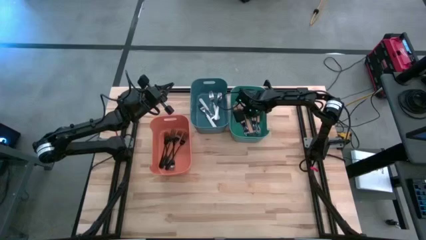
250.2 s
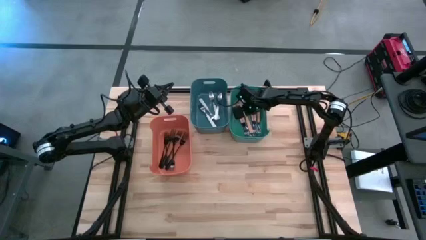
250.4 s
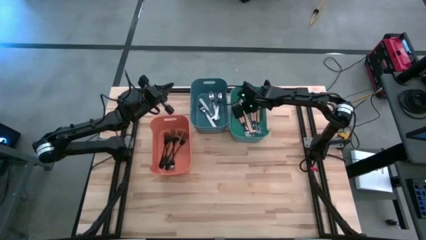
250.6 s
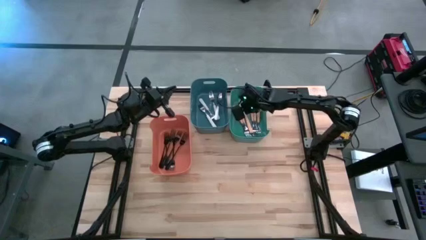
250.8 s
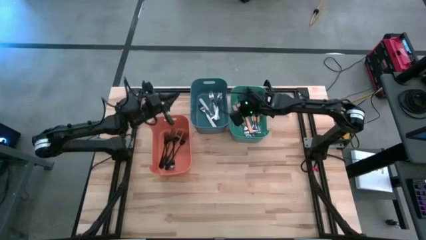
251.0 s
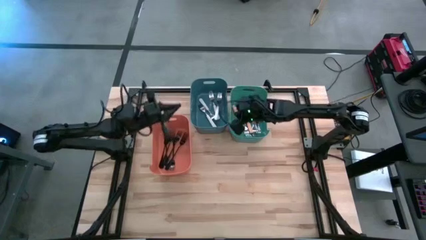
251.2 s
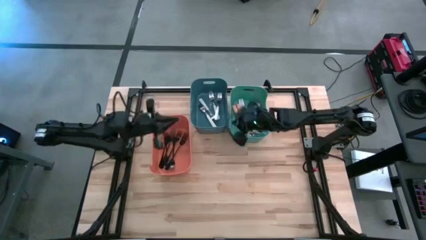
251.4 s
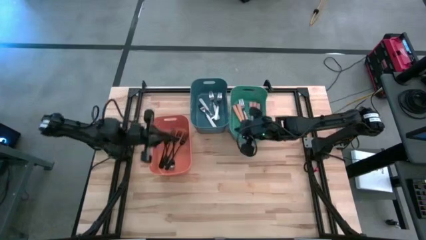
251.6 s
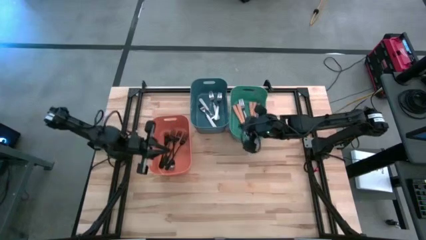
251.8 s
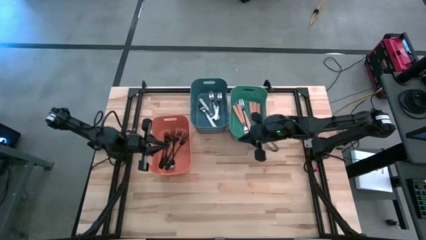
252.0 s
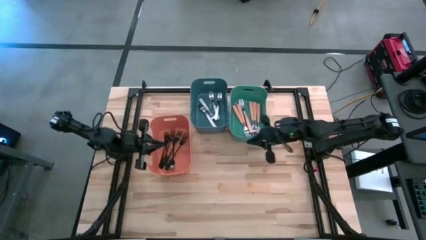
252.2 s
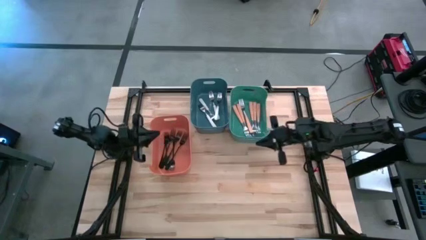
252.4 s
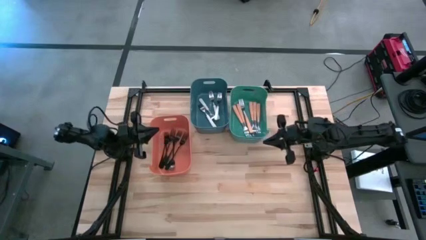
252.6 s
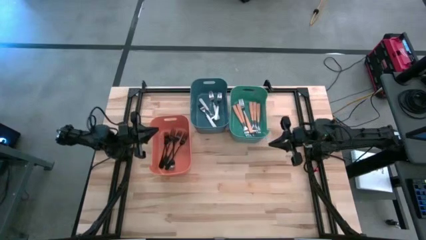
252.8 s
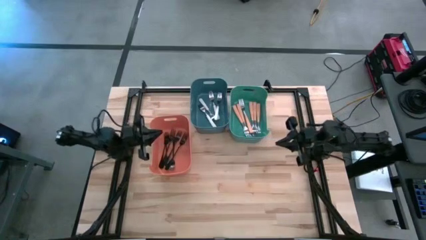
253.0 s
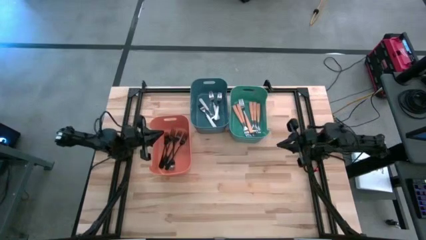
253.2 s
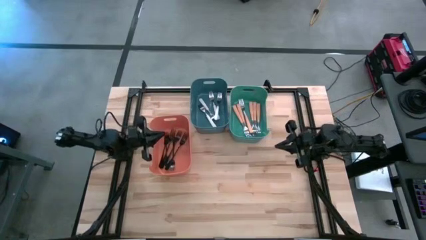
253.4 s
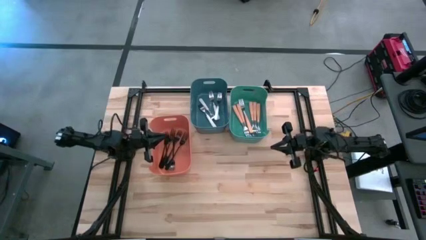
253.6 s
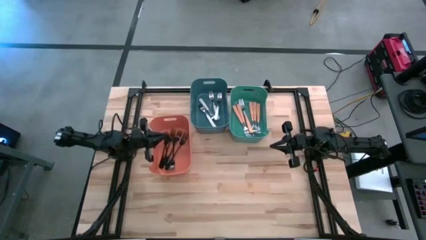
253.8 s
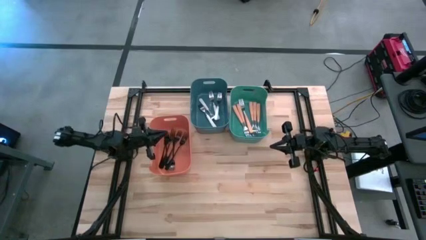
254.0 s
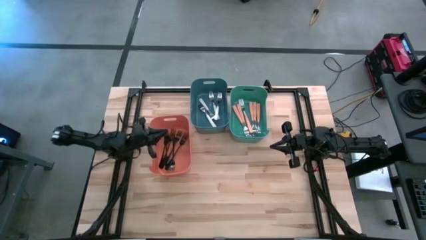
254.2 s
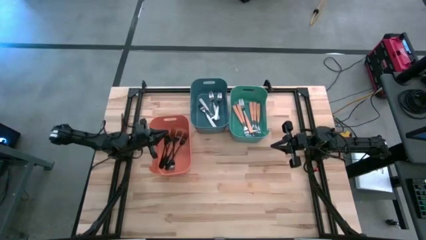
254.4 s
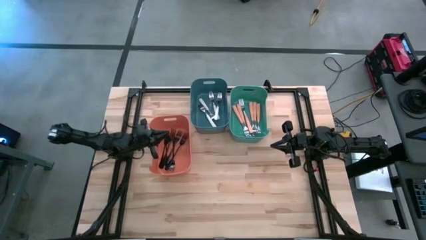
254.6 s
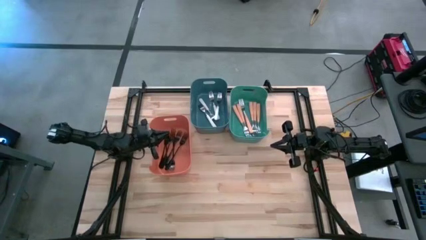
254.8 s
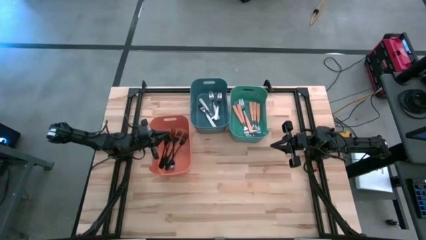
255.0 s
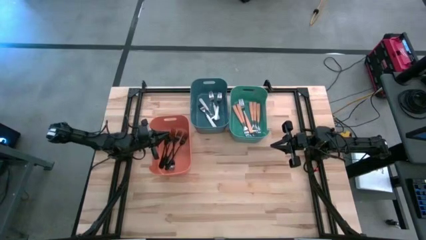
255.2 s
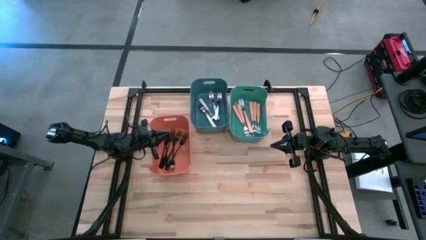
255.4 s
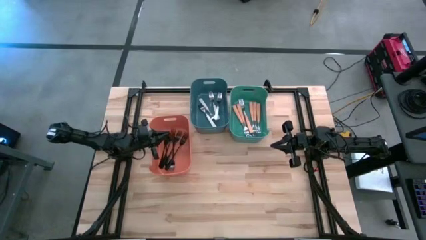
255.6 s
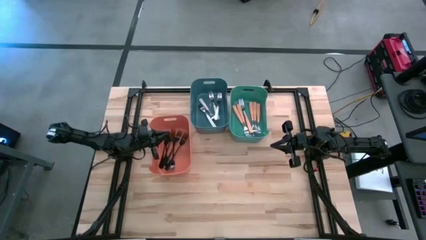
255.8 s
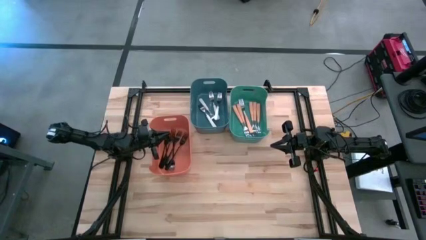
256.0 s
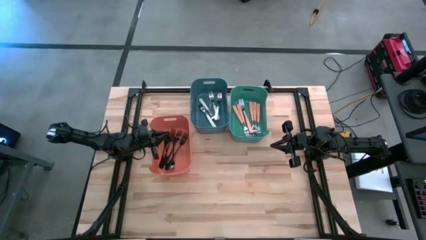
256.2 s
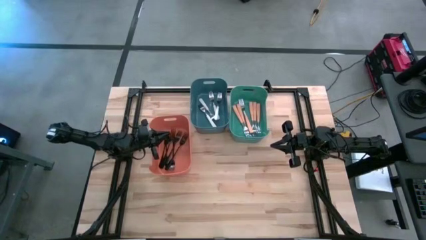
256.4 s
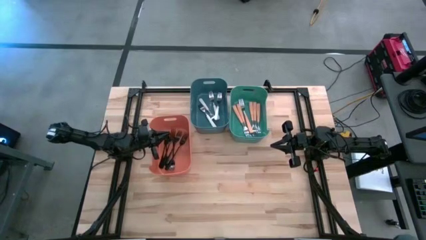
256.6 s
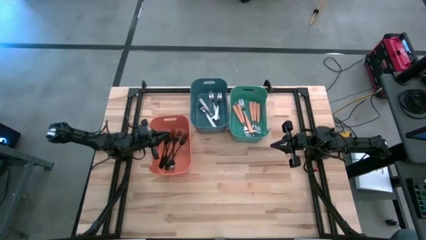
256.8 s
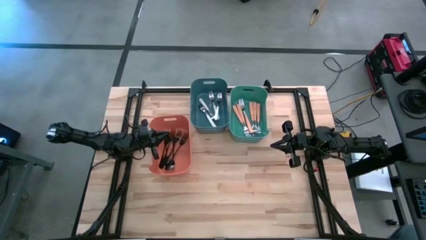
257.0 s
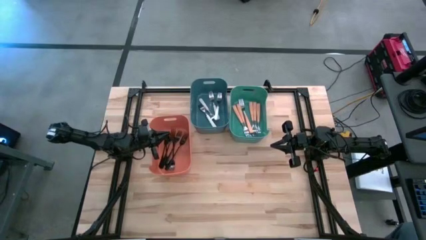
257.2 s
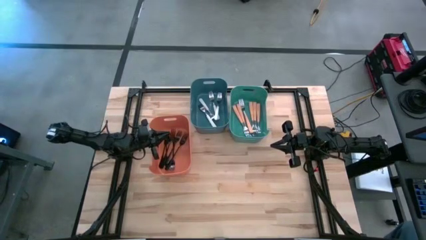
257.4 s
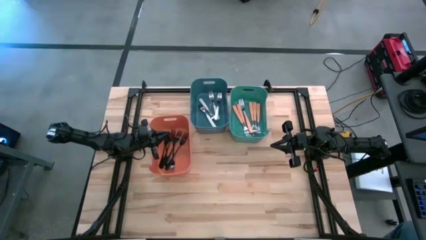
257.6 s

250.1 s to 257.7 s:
Task: Sort silverware by color (type)
Return to Home Position

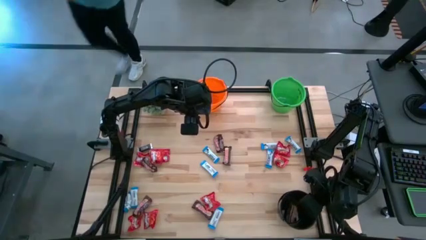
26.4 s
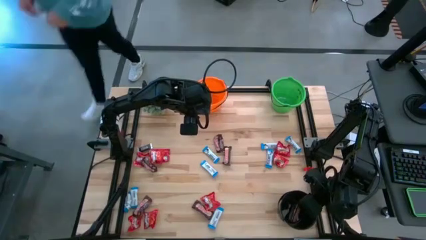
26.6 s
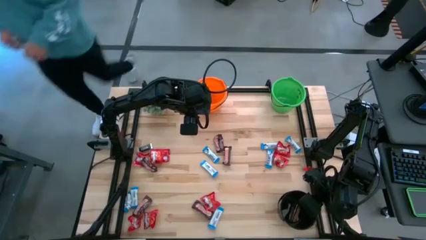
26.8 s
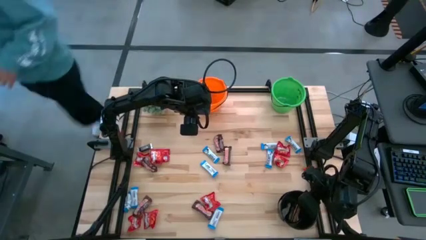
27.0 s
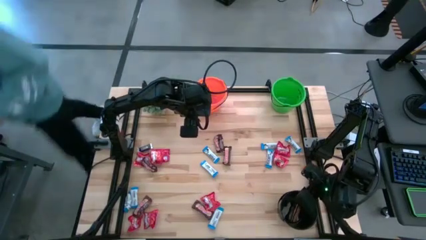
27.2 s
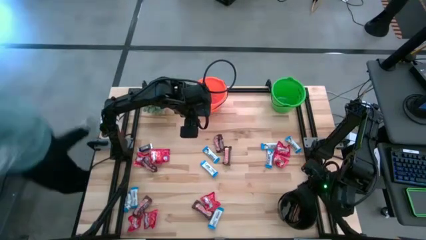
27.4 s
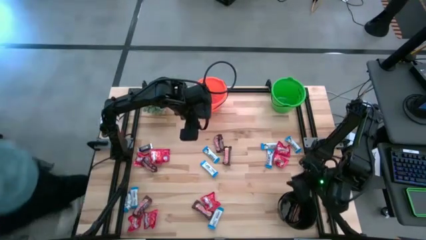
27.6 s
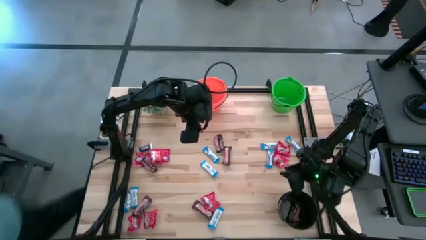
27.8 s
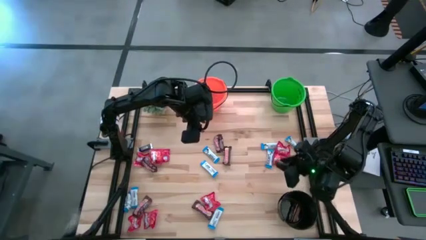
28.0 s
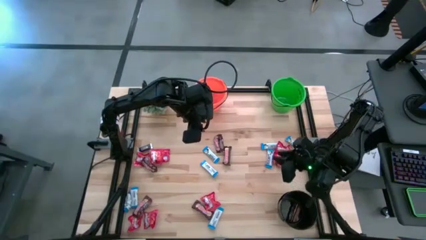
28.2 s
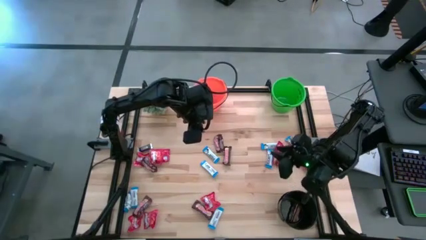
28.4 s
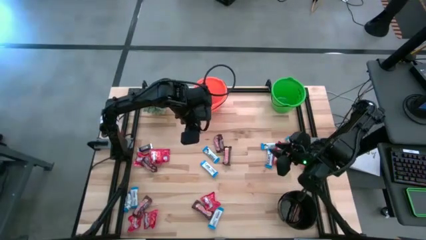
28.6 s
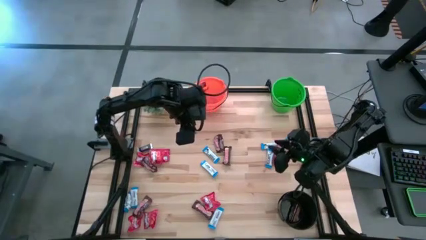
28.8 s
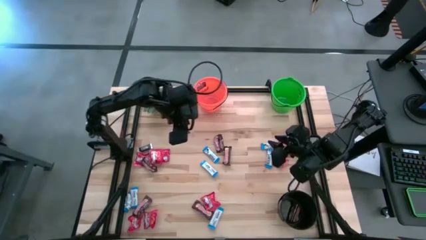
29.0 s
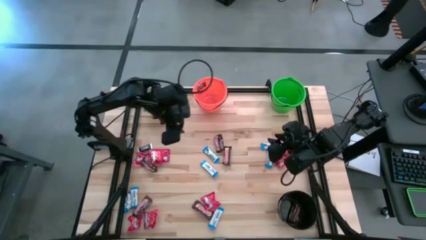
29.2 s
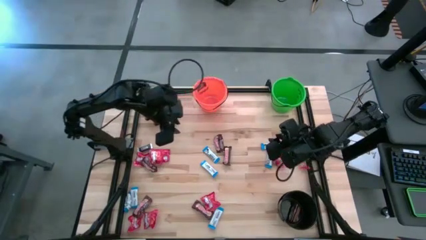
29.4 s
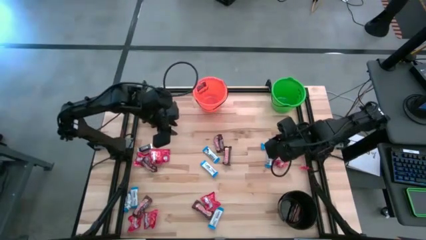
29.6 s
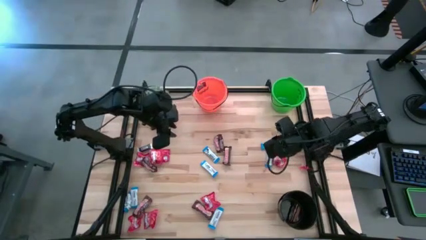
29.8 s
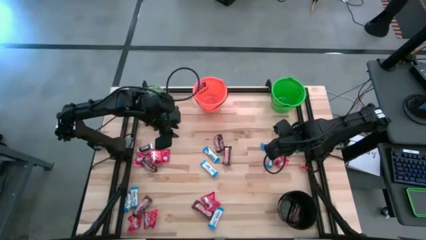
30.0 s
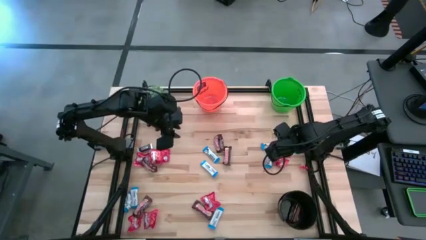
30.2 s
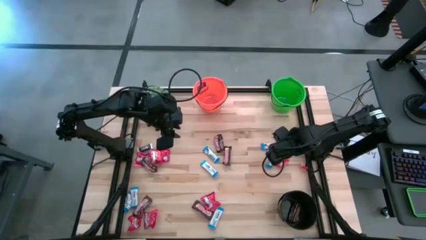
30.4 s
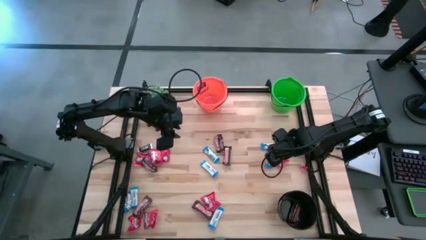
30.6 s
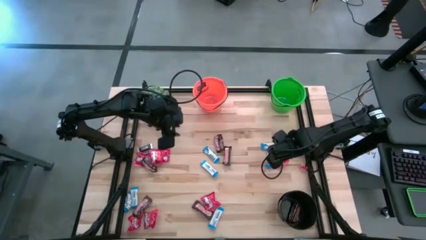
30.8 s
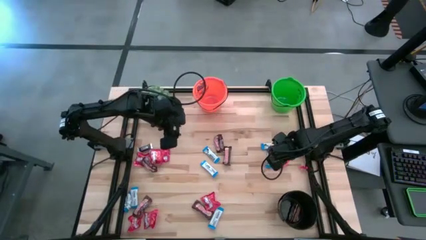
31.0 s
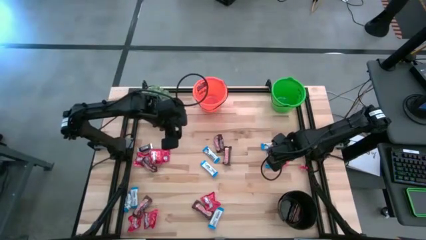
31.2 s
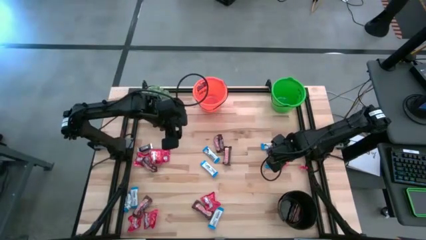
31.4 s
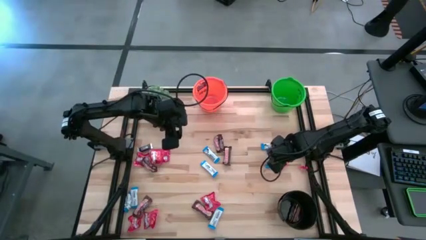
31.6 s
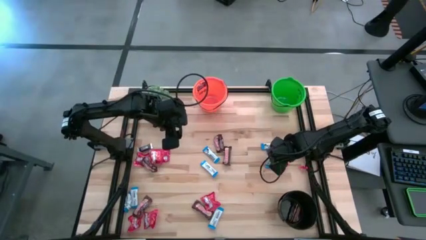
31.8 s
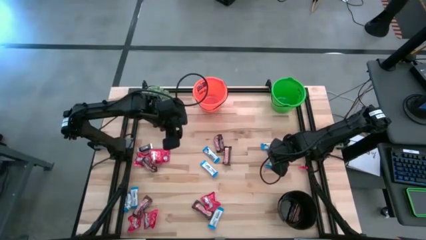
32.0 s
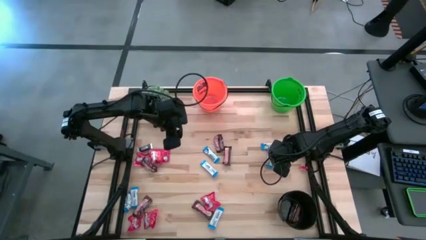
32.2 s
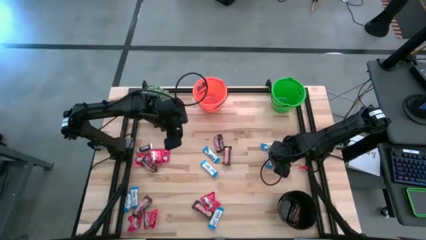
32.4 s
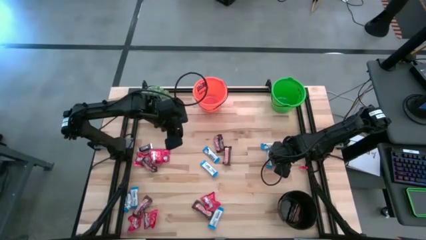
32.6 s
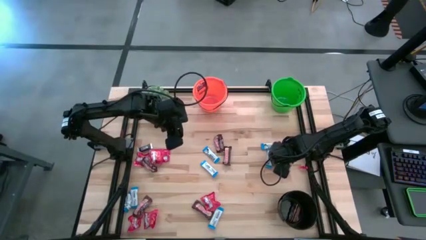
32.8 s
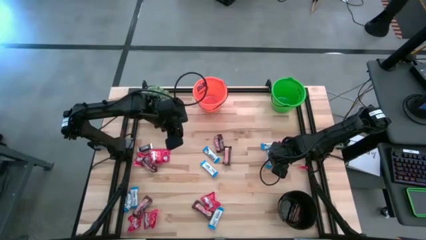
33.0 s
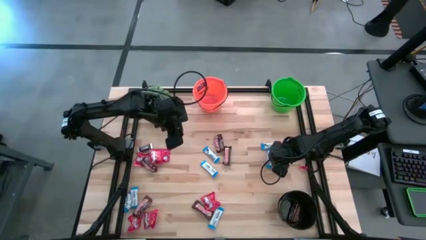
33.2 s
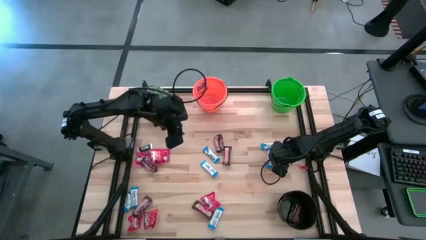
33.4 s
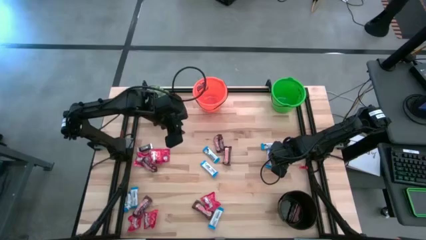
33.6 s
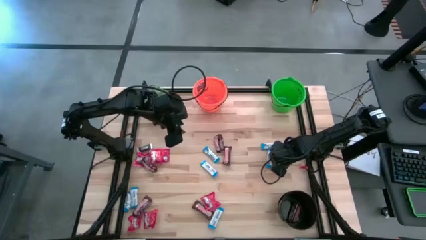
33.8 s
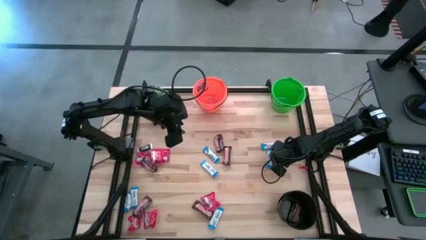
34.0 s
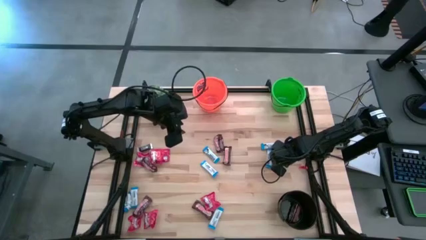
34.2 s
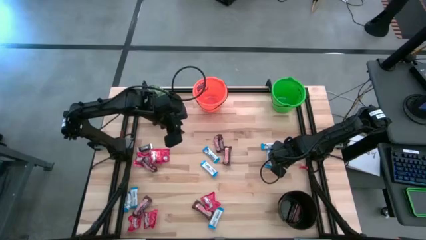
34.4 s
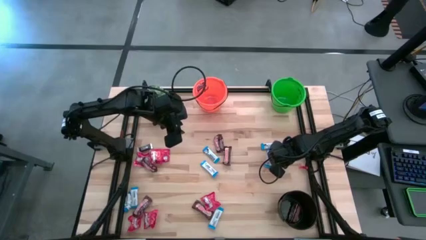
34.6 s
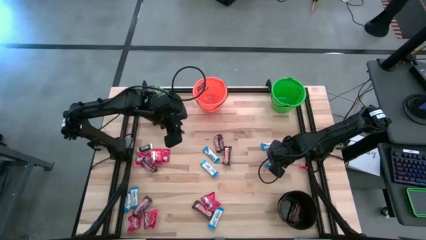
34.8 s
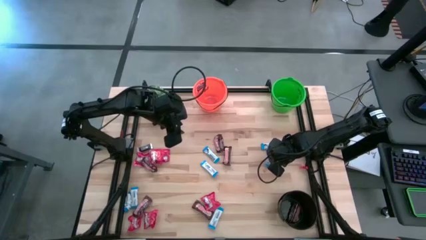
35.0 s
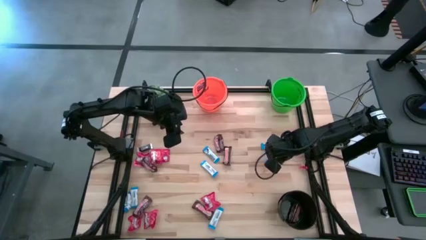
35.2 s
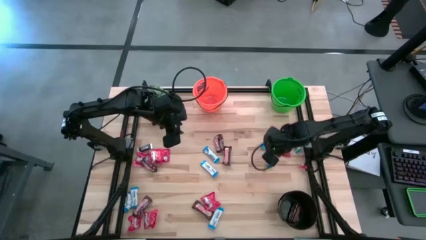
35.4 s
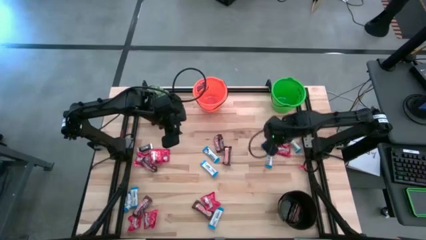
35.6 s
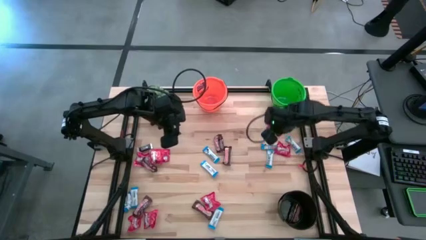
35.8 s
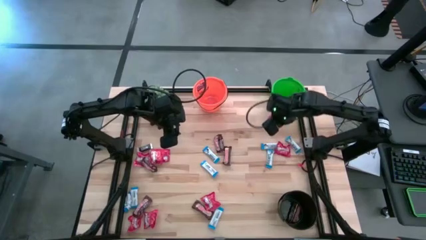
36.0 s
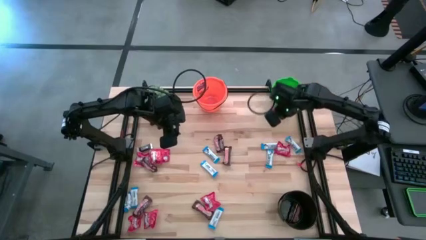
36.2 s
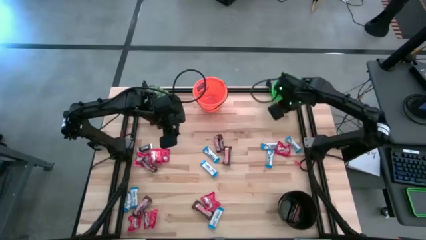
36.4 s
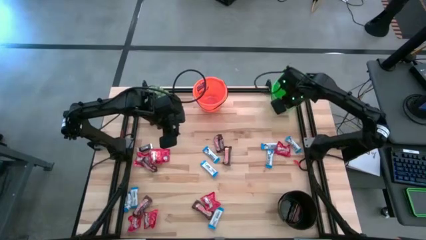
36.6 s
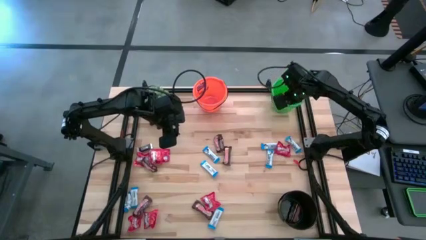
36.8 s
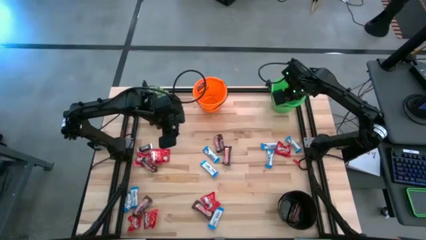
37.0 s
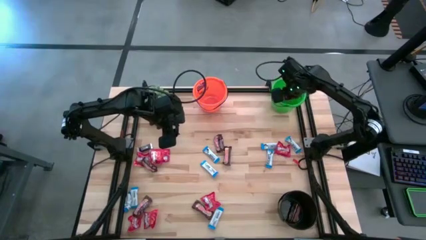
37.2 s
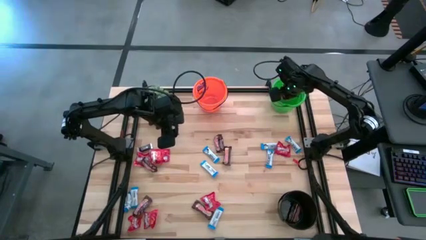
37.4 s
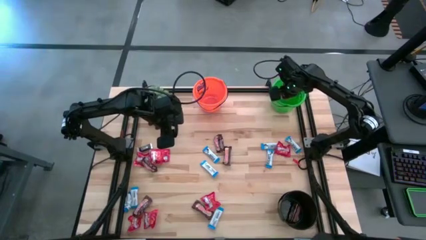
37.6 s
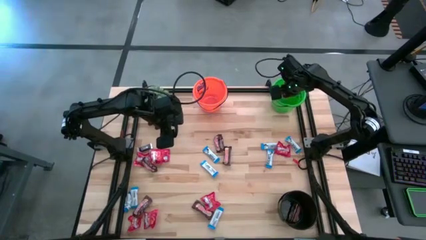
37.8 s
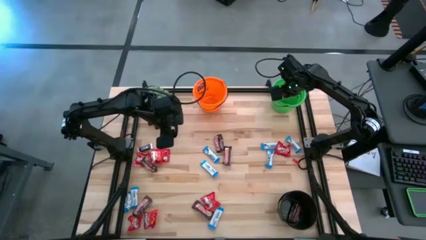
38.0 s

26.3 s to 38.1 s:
Task: Organize candy in baskets
Put the red candy into the green bucket
